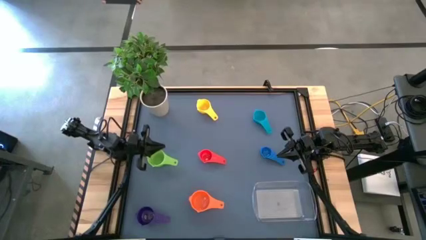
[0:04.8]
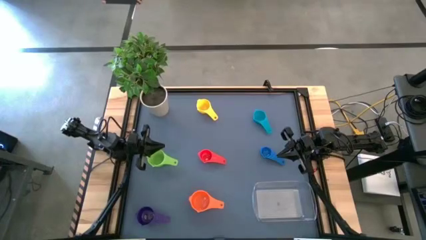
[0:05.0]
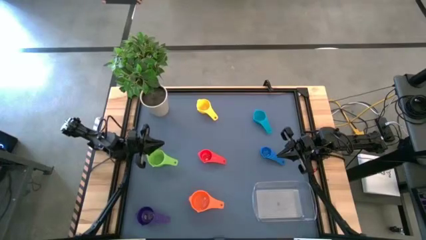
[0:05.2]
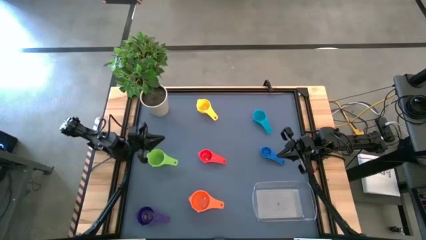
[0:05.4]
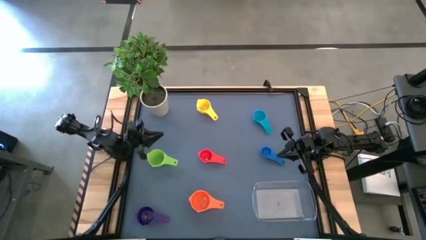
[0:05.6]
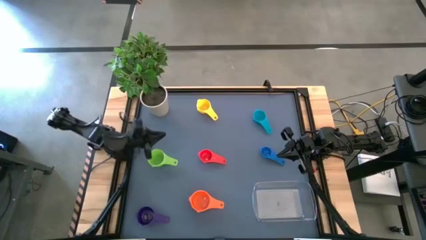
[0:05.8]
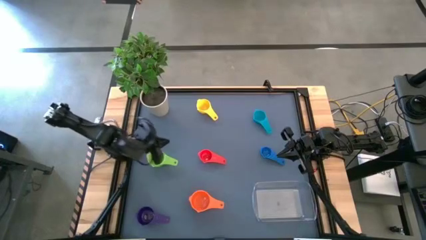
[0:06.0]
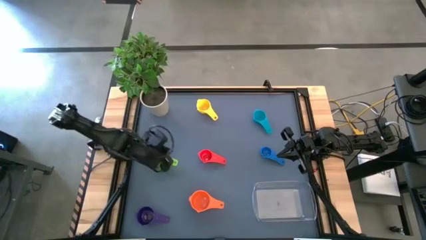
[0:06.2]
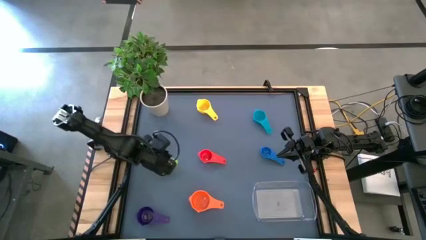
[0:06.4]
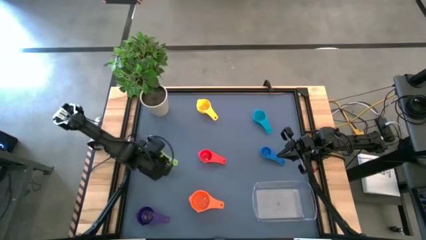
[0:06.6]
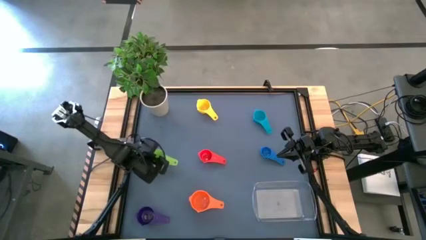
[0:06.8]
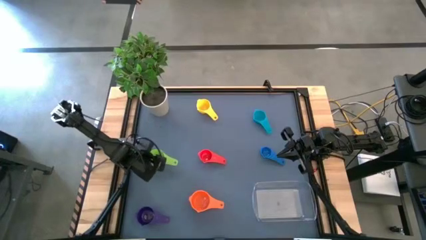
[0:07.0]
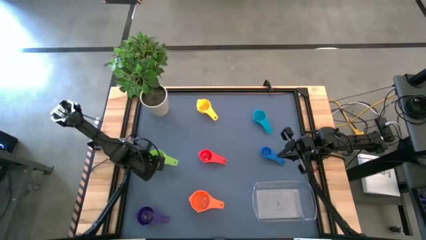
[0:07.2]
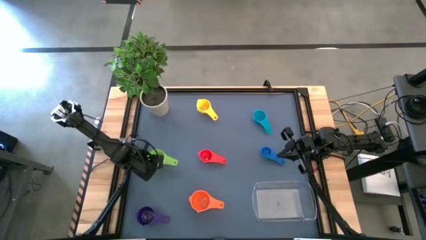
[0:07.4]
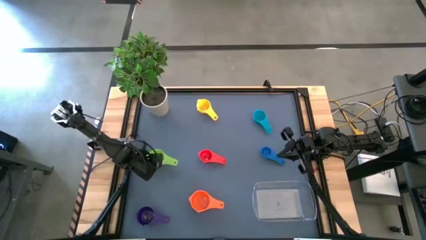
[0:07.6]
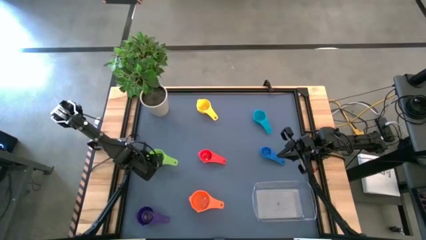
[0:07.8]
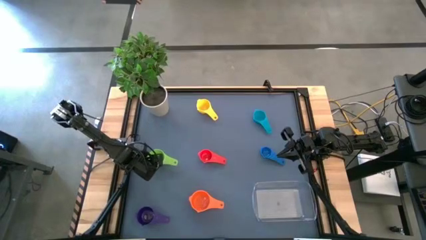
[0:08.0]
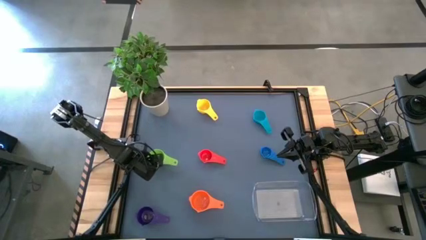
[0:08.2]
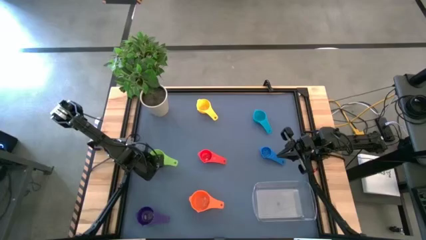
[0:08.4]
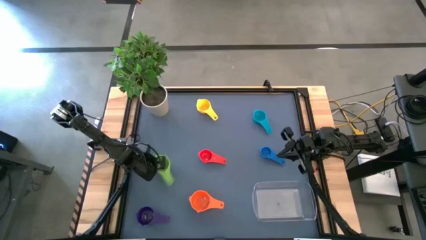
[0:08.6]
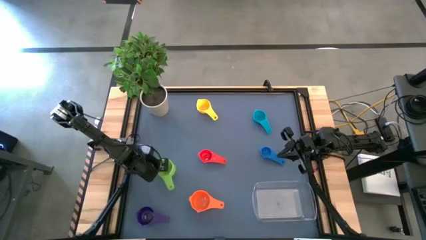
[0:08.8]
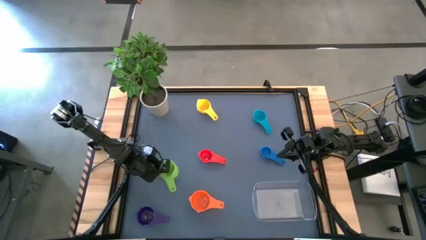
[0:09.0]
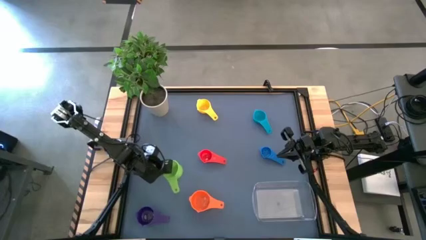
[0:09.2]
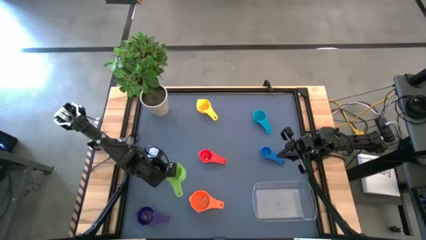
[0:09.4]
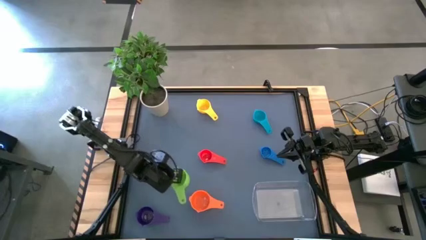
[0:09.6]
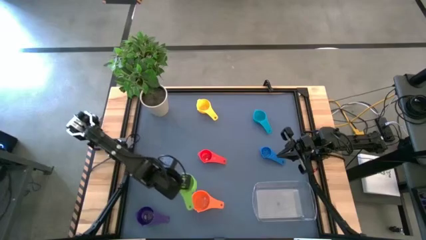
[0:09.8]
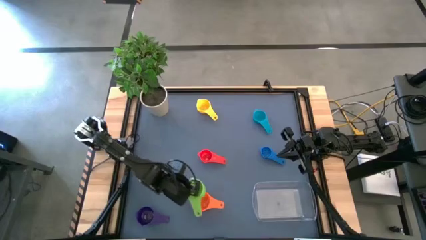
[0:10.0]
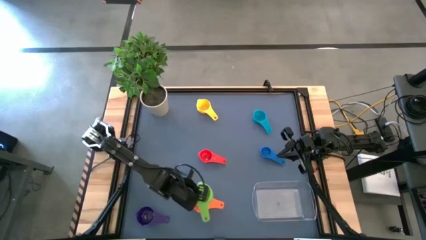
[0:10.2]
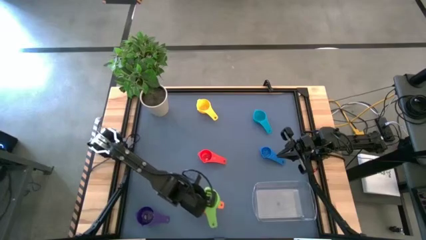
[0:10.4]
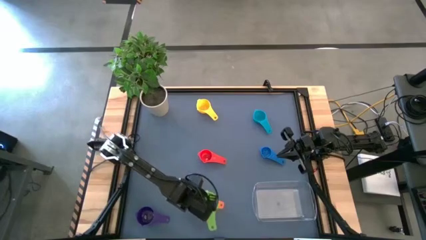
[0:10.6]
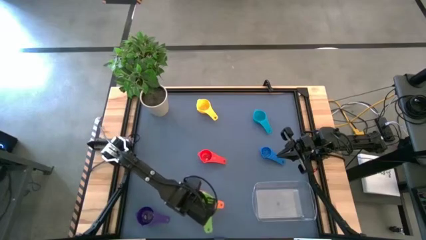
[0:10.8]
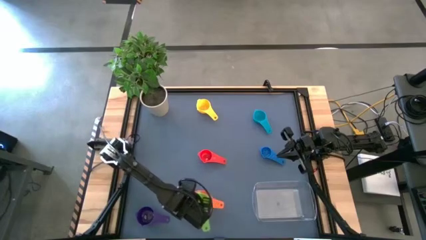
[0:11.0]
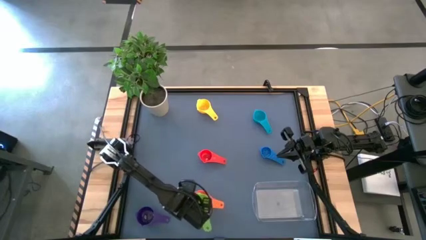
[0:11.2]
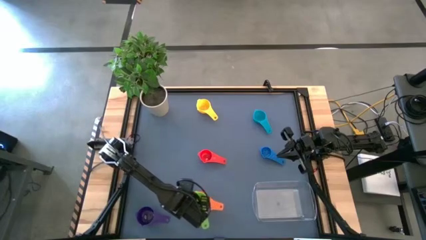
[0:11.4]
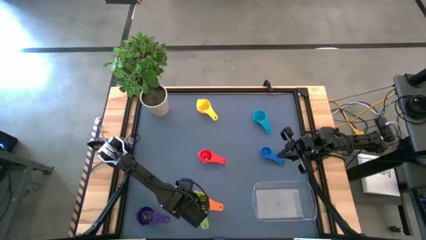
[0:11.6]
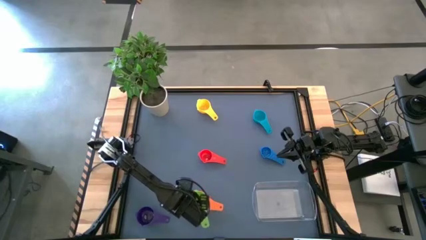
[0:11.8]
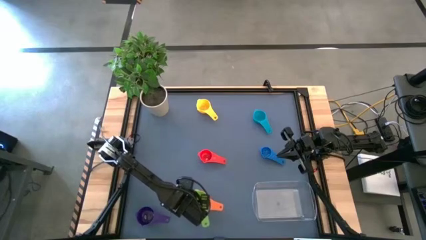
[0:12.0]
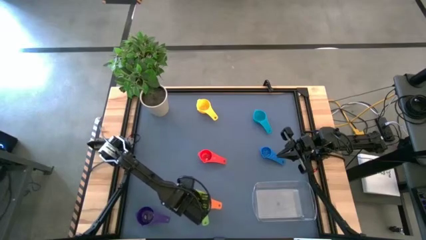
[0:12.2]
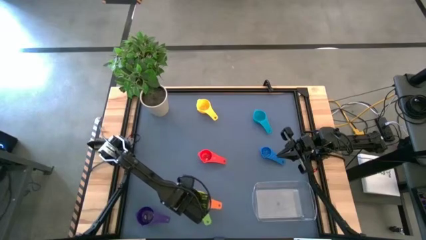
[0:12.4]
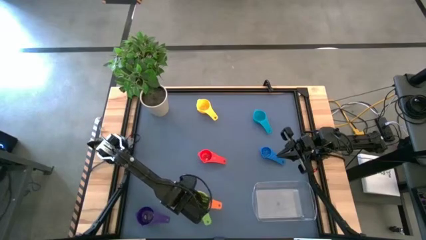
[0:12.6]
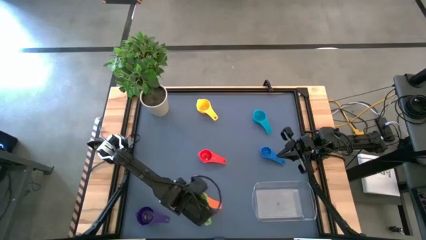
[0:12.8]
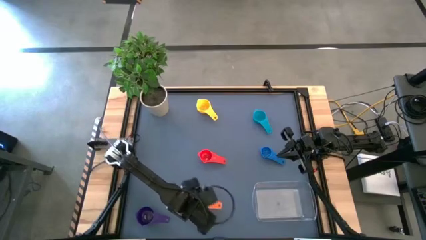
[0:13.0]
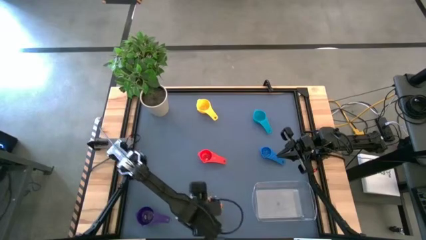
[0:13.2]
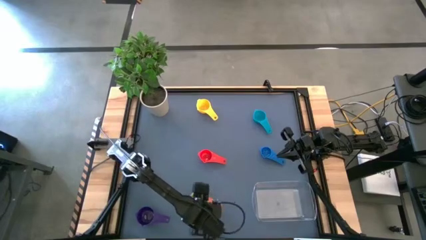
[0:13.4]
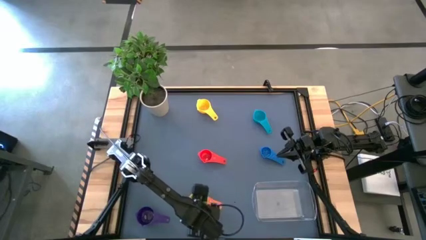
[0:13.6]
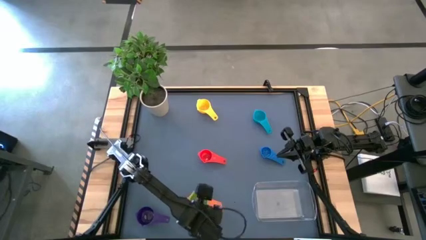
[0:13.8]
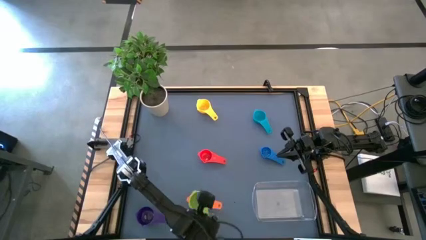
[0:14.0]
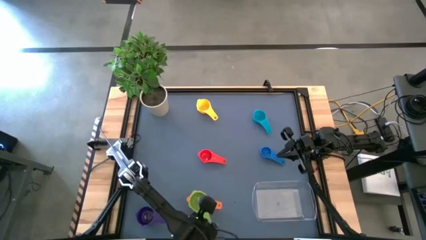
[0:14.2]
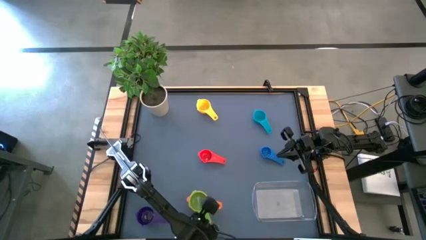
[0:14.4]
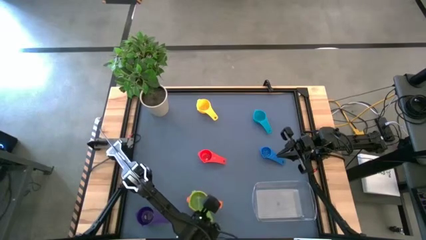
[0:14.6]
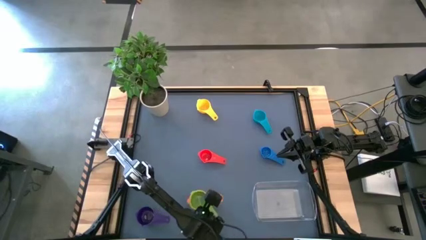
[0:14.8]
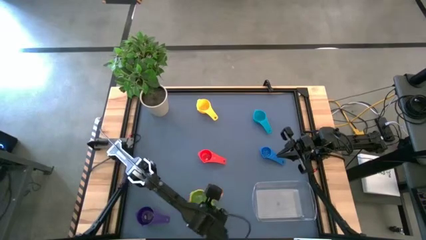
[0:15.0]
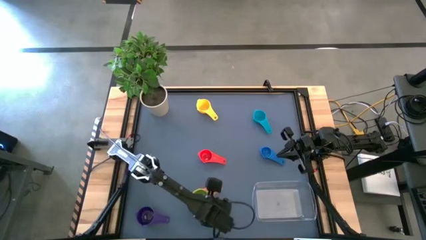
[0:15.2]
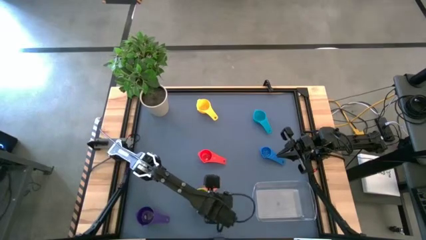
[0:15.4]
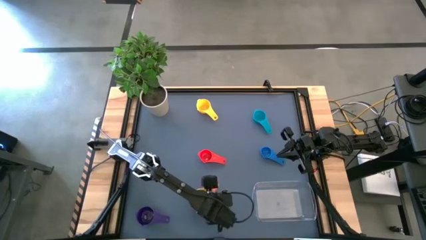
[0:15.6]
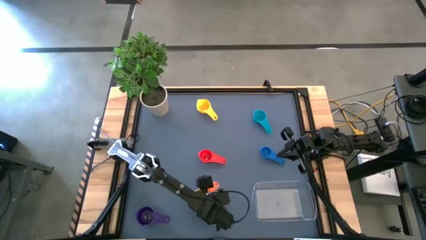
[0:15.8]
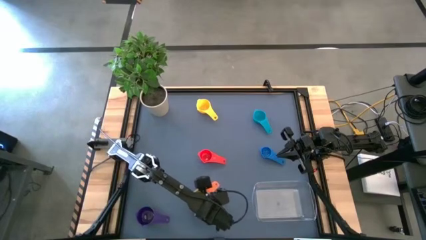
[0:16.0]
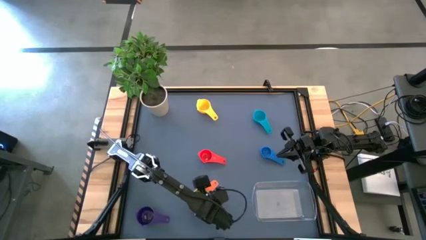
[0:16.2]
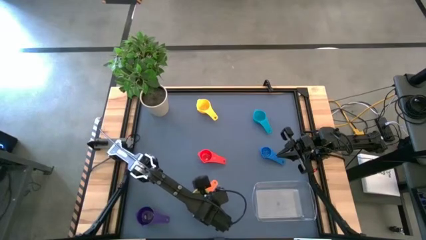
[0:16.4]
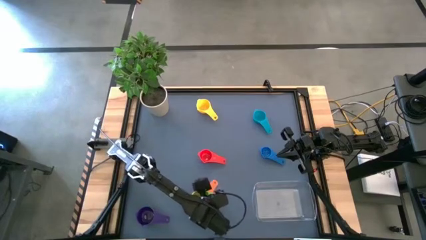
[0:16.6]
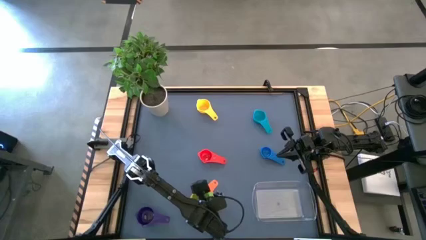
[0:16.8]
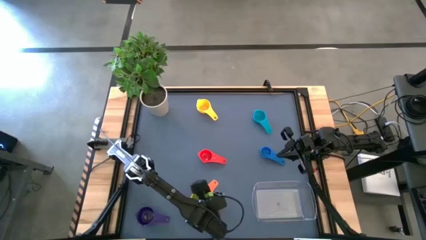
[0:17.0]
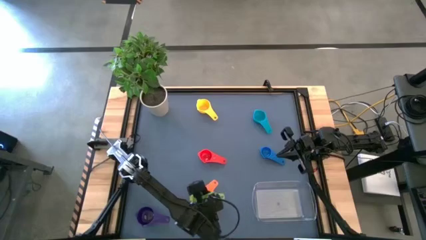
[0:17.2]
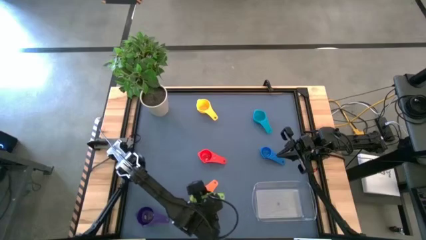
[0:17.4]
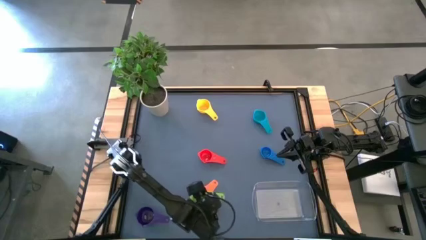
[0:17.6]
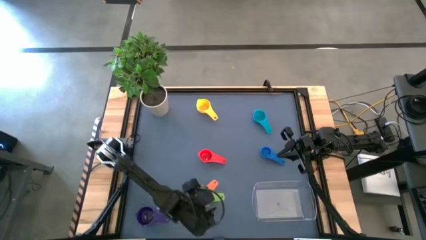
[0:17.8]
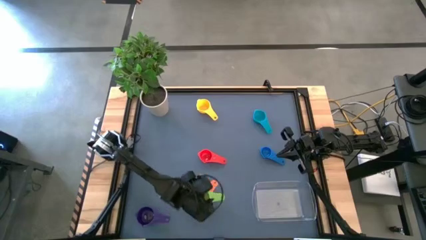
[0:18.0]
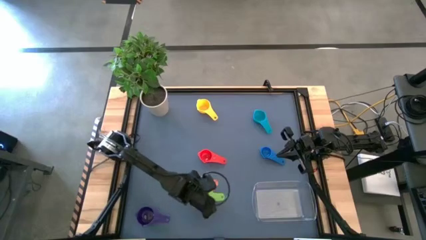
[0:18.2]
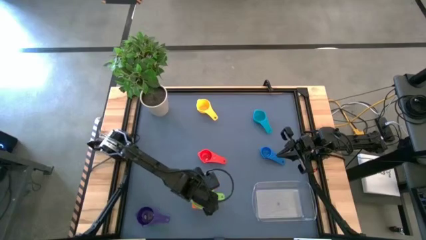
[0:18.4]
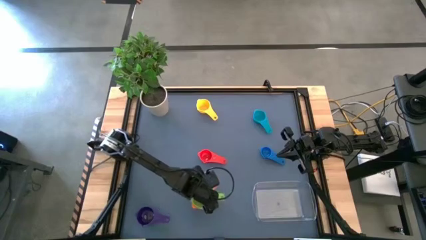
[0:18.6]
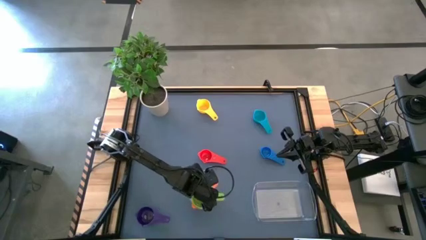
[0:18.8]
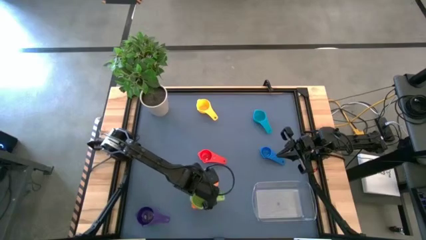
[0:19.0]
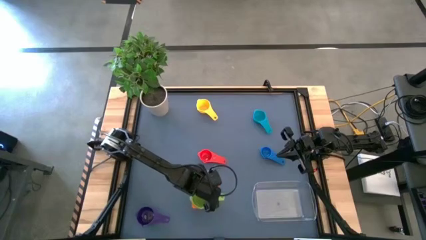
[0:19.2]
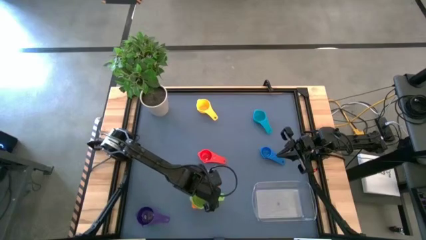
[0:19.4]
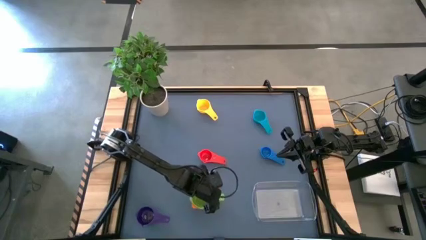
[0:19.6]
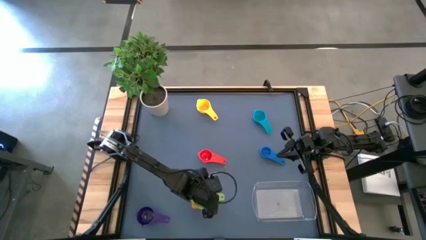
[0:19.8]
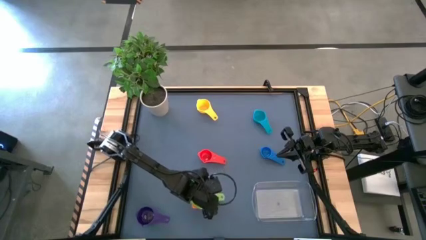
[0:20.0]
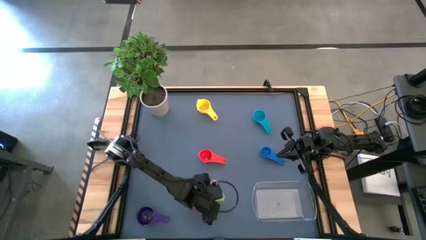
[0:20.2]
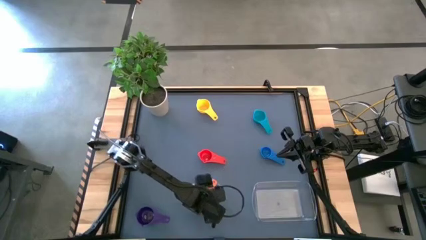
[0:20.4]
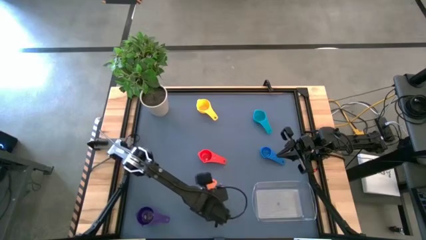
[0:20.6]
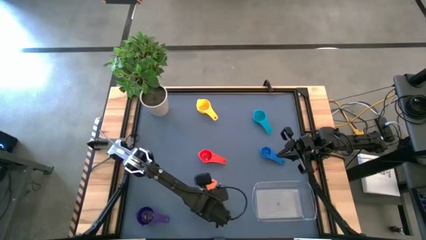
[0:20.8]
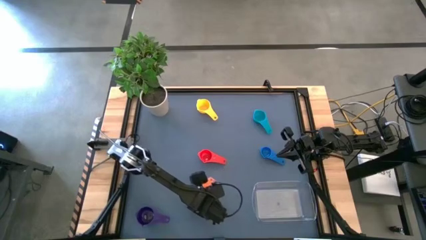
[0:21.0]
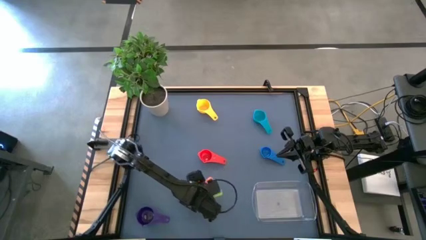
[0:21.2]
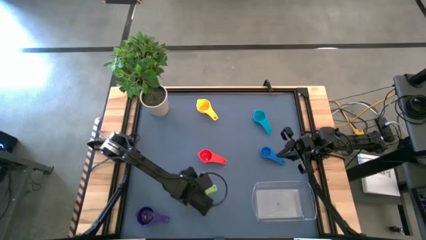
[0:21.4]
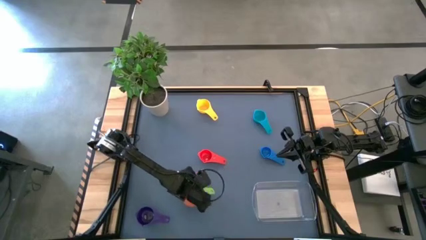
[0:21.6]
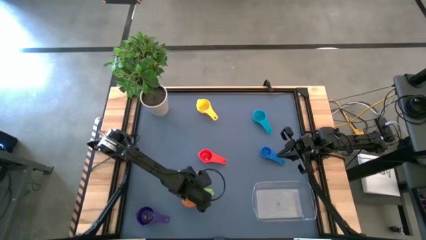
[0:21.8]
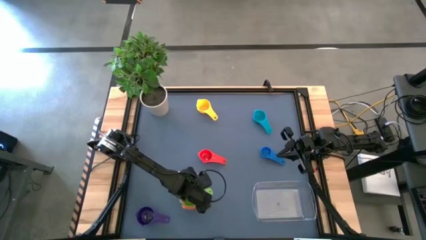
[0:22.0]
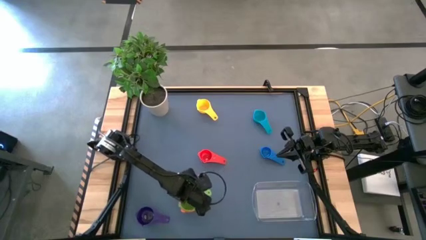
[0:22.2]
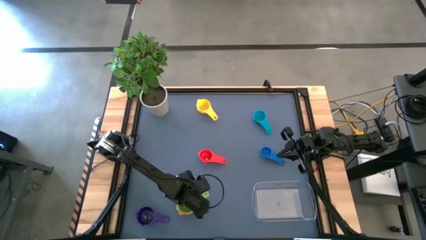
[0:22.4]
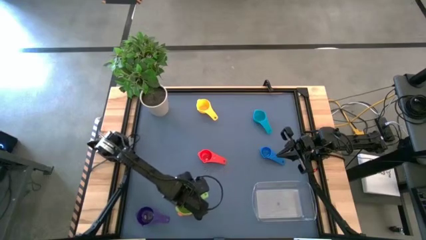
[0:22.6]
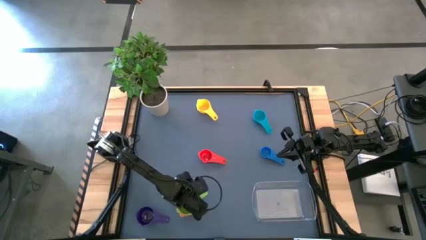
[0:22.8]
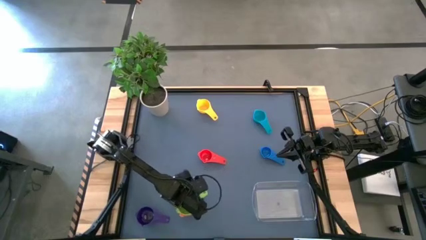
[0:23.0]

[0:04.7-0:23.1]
Task: Nest measuring cups in basket
Stack the green nest measuring cup into the orange nest measuring cup
